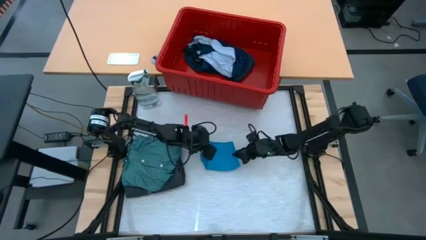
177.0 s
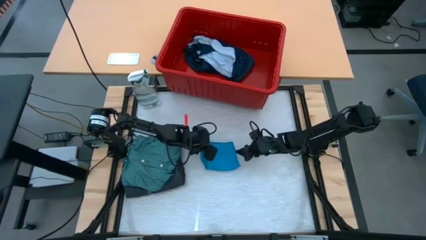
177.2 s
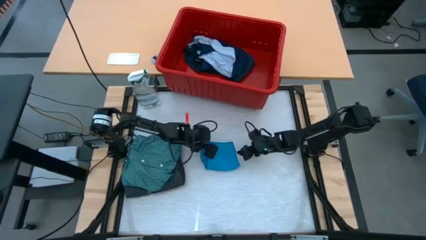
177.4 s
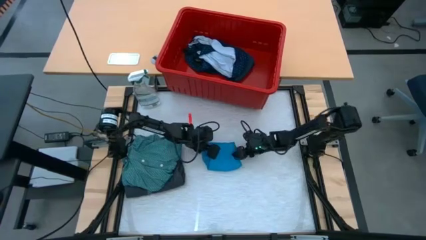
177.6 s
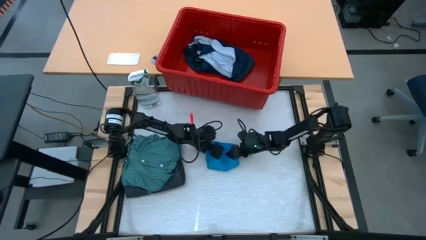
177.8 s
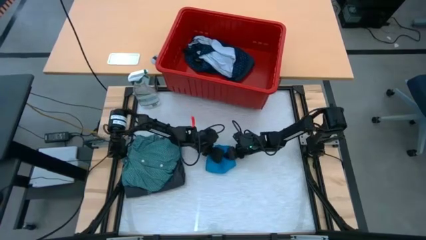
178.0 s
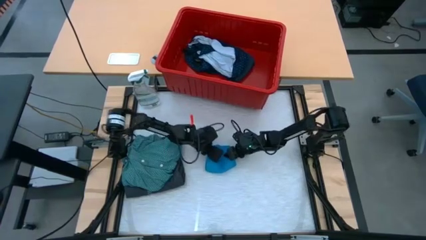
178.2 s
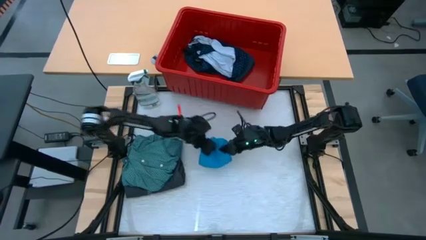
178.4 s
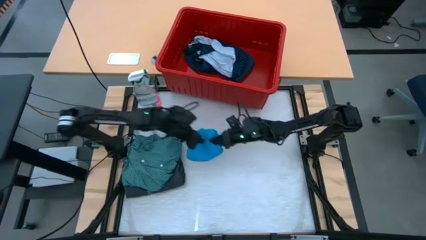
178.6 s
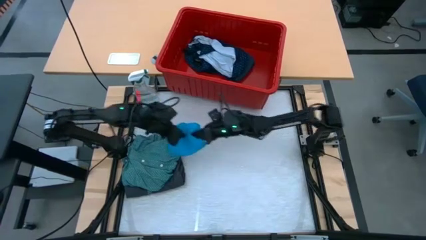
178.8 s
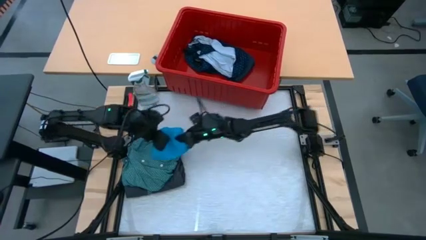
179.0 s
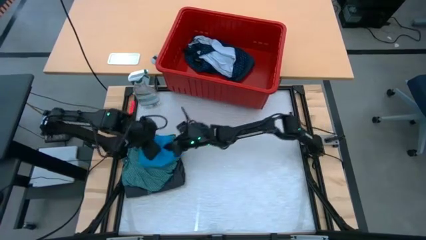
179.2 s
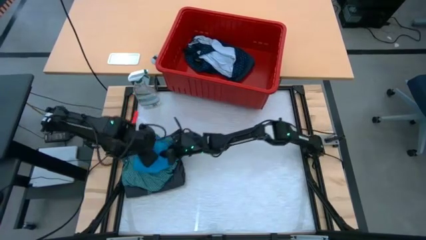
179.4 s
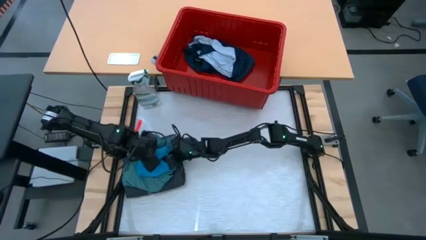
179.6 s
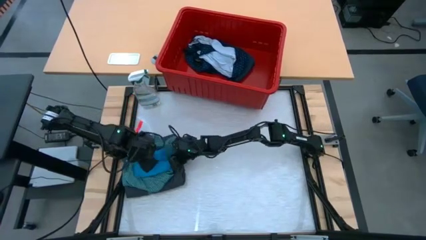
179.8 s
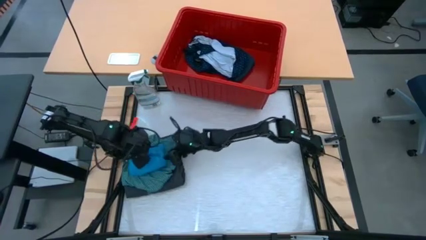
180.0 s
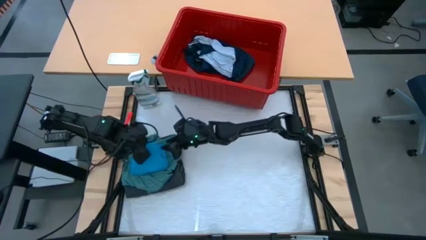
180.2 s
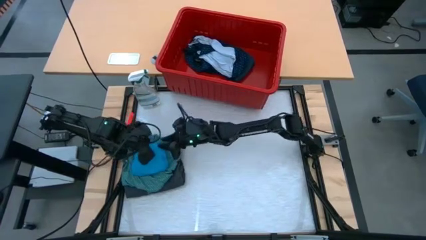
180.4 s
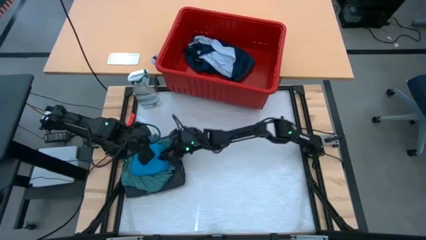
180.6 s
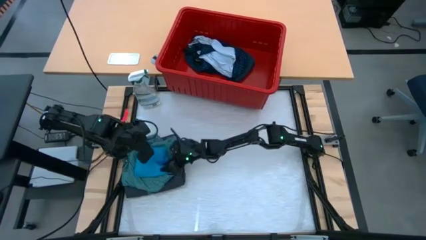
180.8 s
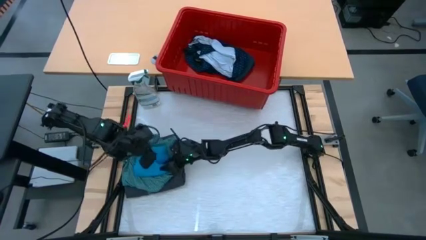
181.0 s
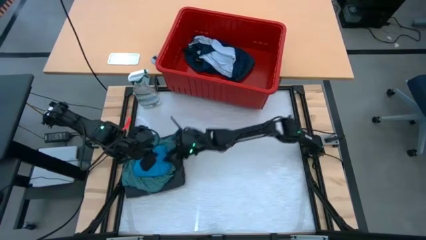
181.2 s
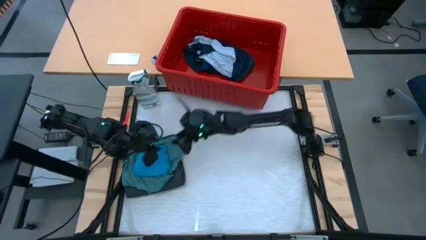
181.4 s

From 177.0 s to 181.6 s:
Task: Fold laundry
Stack the light blue shorts on top of the dark green shirt

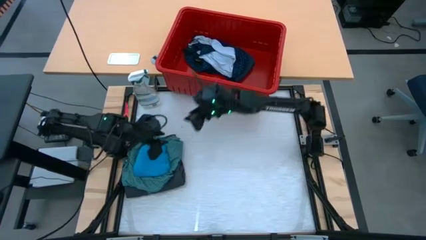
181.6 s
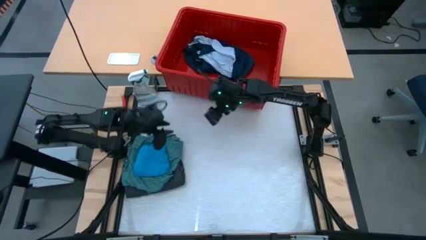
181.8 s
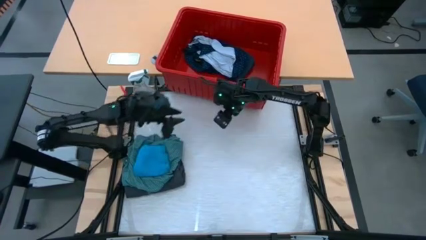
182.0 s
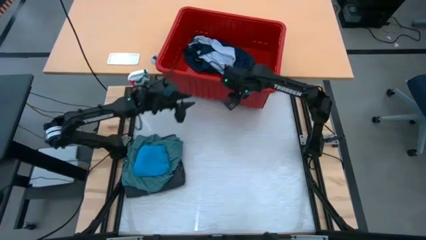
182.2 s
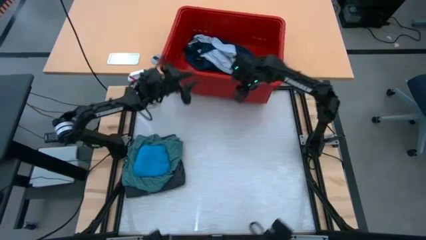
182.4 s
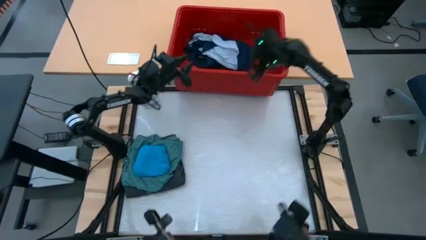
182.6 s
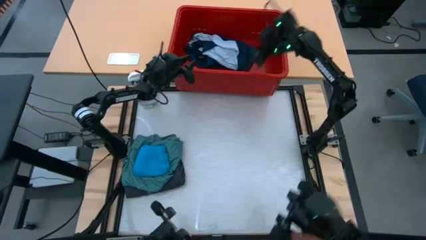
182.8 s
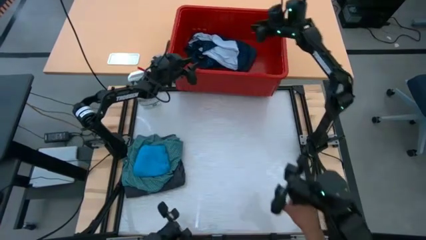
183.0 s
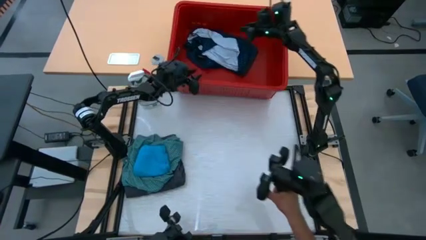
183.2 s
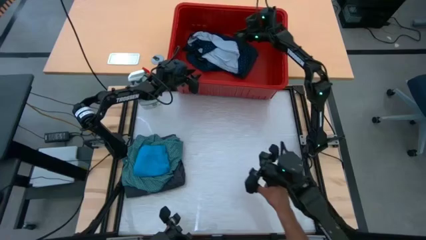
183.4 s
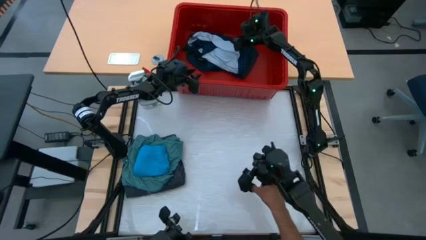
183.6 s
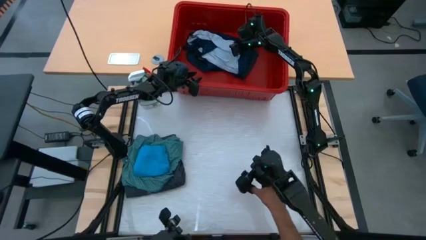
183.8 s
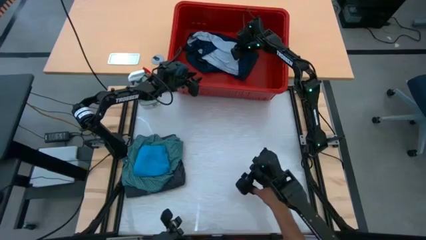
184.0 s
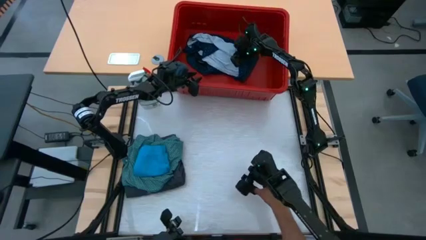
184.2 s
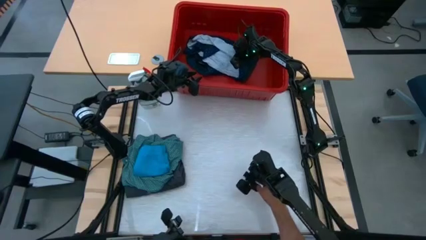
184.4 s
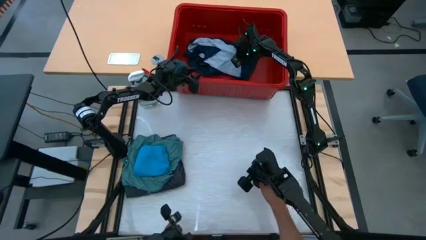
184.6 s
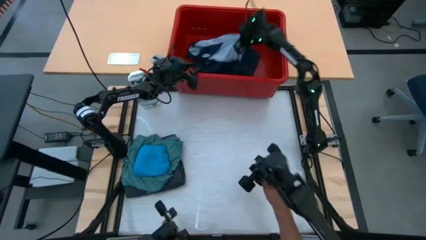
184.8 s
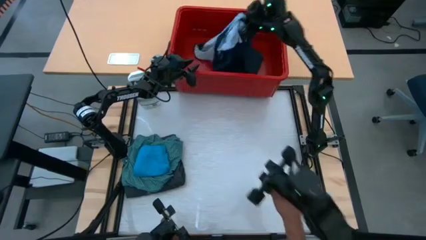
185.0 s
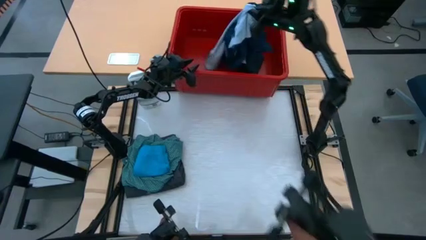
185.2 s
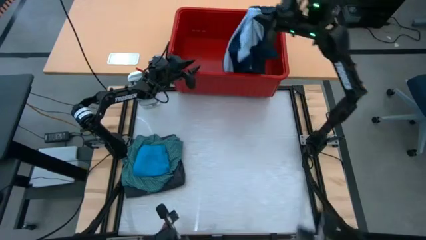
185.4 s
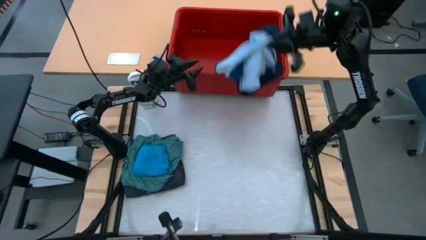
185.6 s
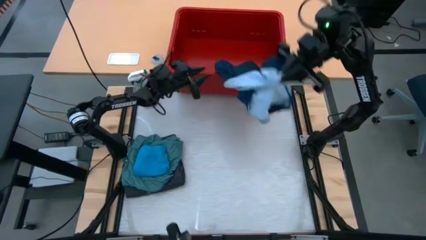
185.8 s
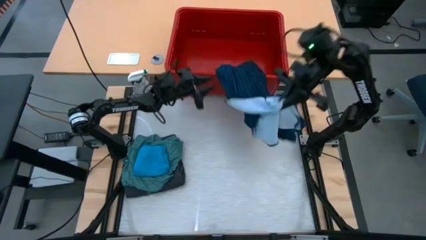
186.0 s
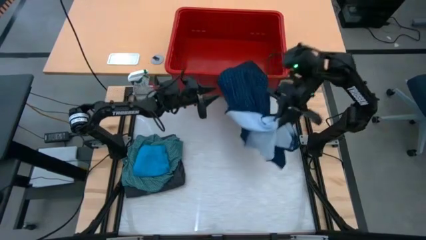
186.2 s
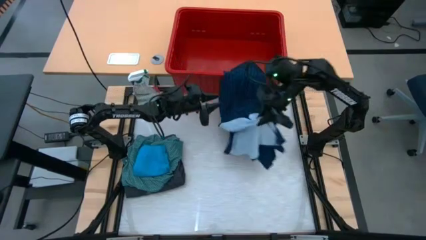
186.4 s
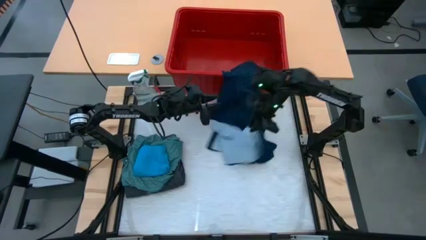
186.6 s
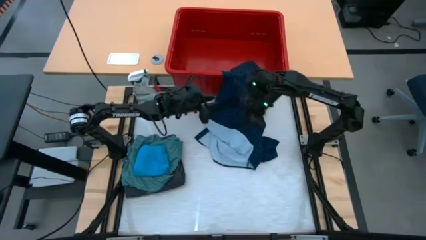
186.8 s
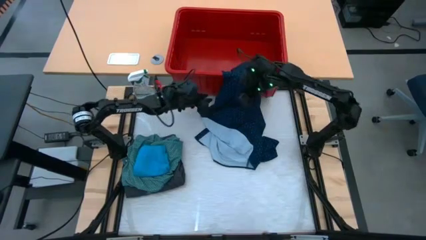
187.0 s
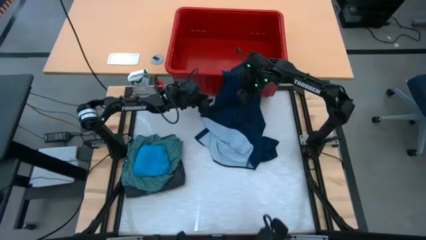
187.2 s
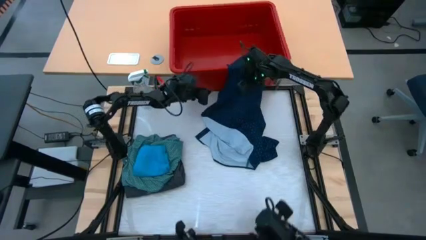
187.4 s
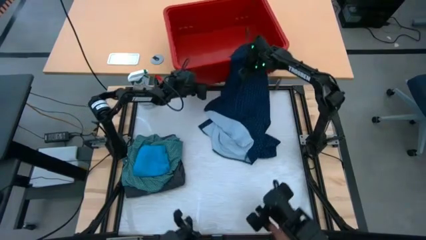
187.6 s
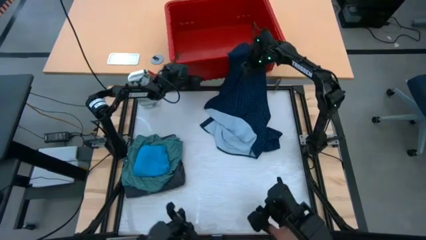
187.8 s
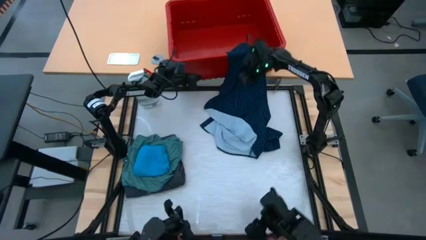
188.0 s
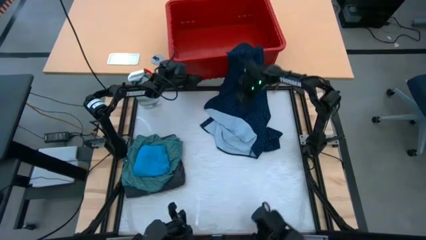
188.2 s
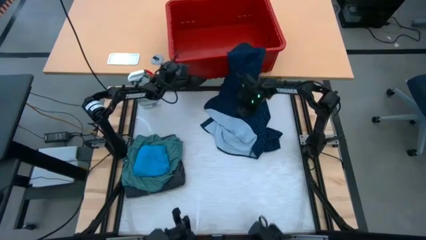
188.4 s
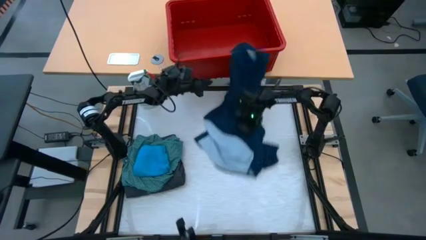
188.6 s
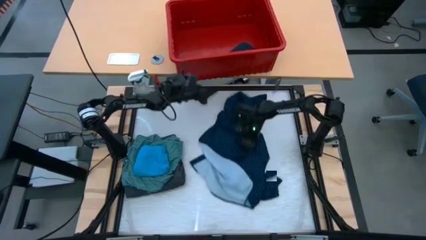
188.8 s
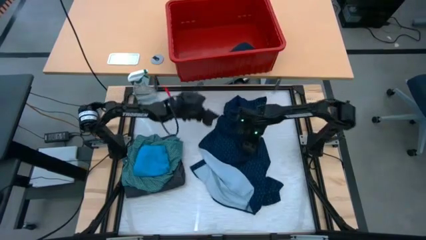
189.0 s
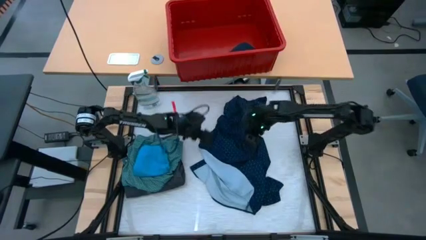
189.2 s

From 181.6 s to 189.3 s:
Remove the blue shirt from the red bin

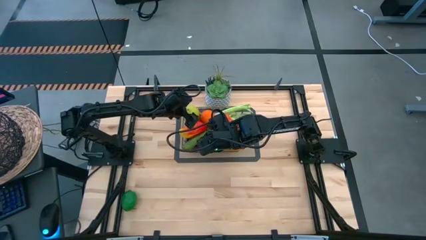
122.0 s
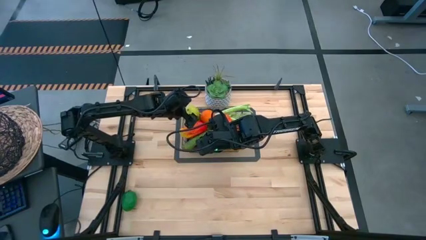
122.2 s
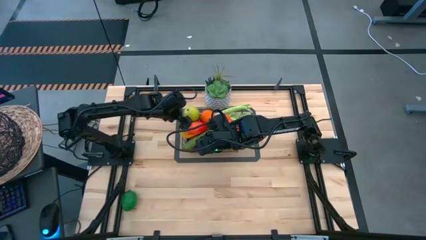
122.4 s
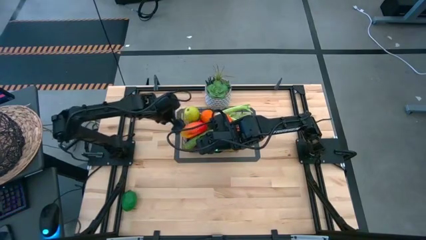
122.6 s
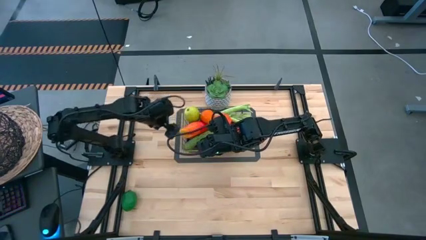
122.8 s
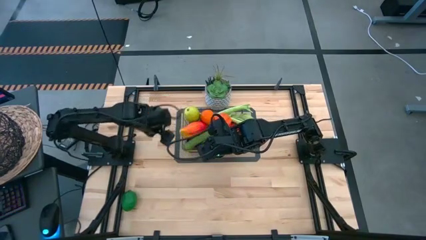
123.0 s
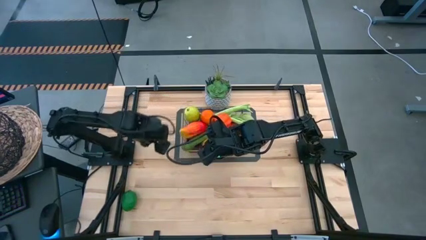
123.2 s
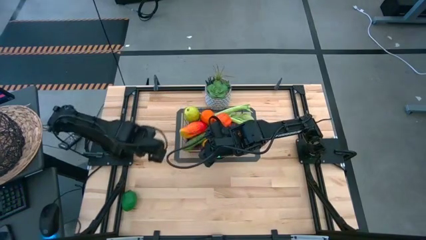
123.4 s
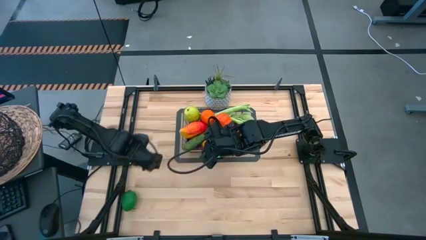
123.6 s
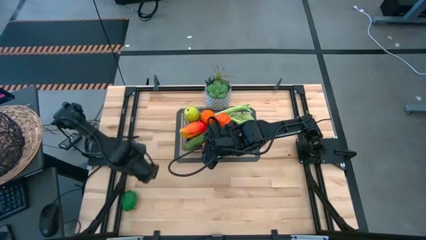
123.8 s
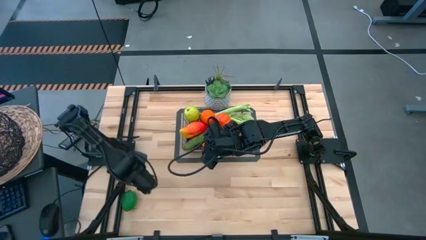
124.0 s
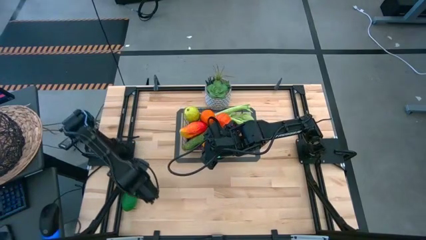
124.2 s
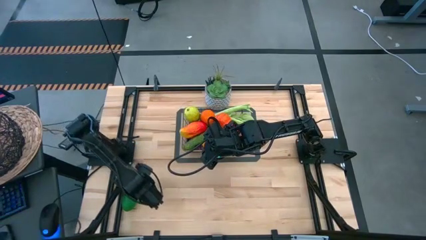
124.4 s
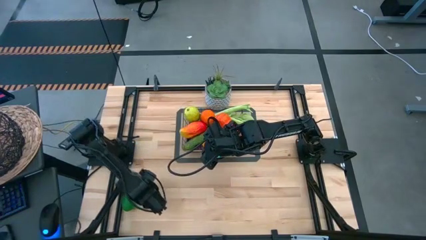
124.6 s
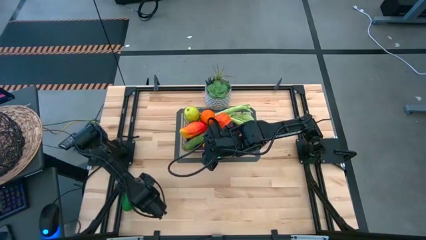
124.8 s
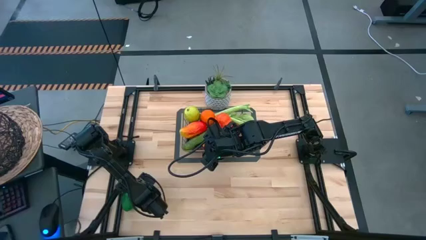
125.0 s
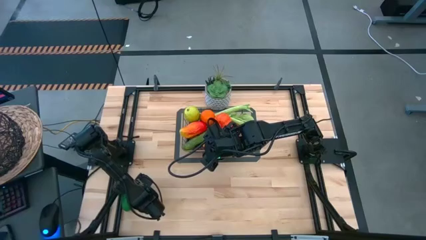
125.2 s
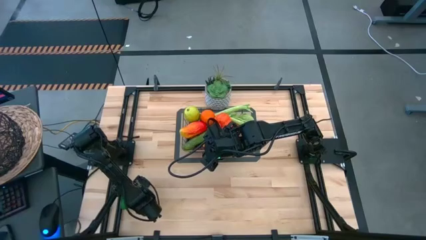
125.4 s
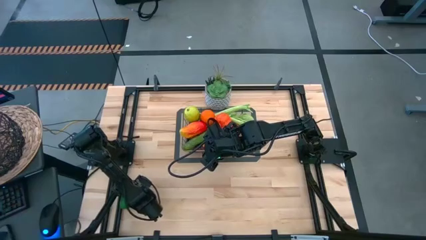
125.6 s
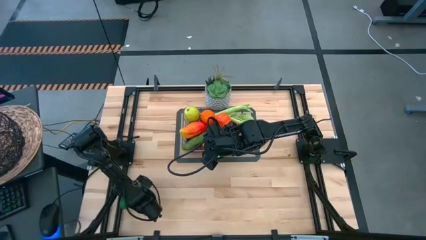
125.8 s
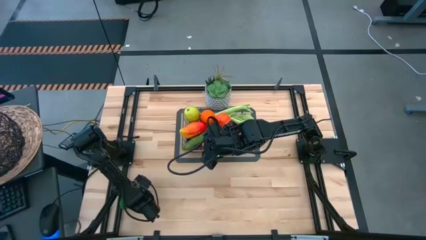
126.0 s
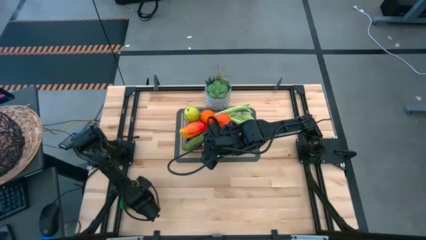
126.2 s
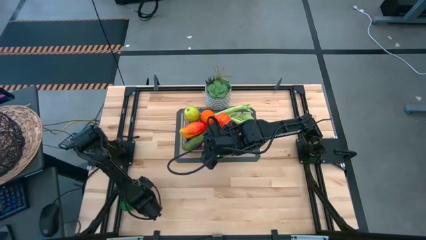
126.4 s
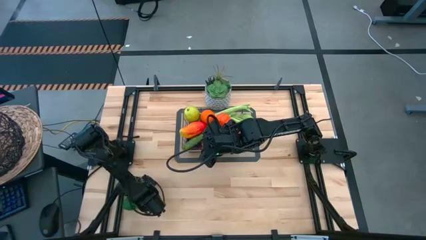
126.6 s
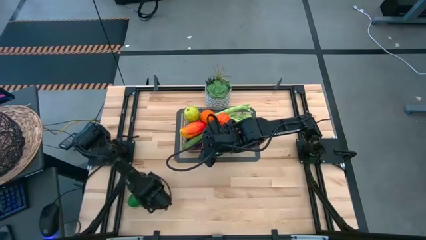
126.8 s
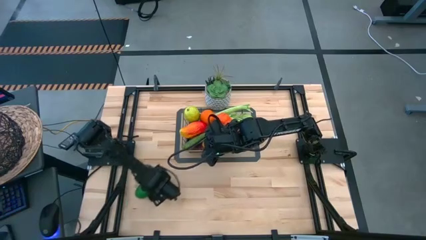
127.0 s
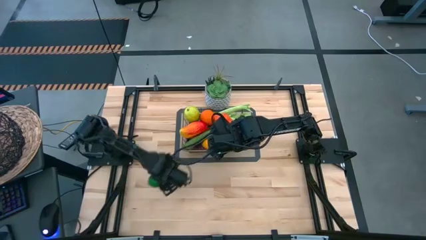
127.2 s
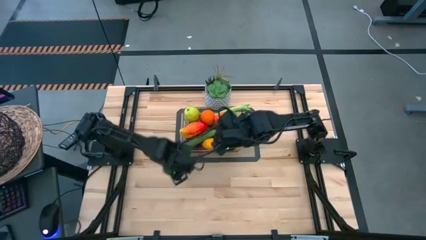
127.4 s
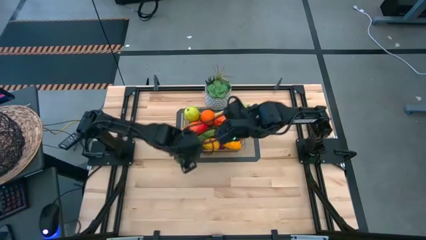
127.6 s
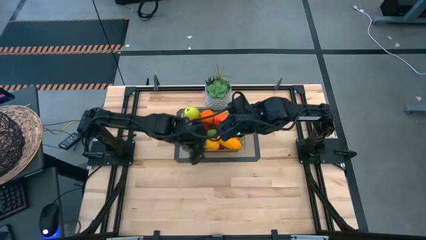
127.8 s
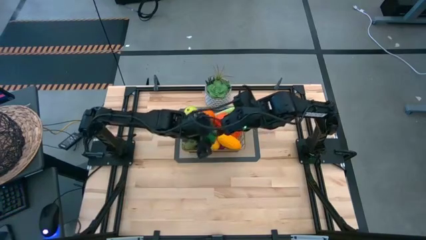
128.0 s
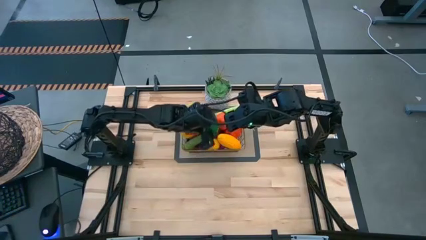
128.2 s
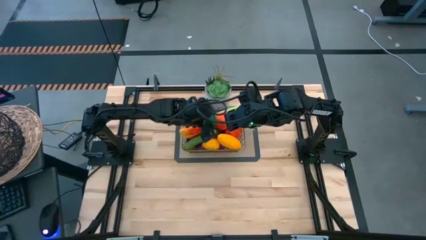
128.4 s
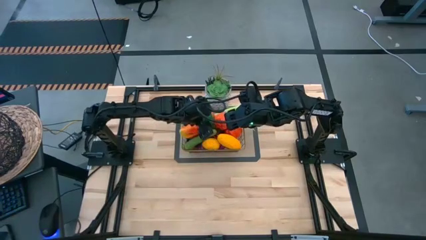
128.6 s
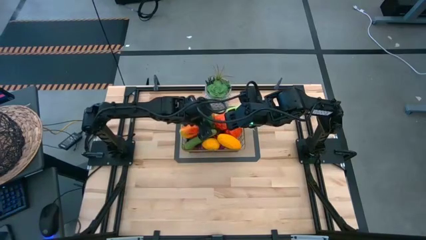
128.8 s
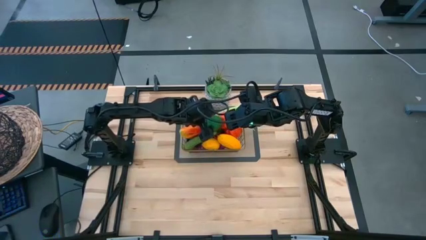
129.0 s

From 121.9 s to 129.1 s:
Task: Build produce basket
Put the green lemon into the wire basket
